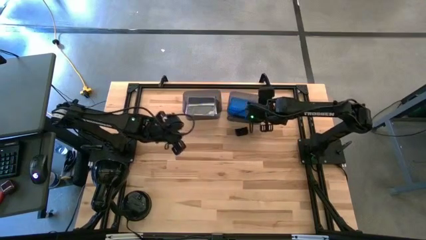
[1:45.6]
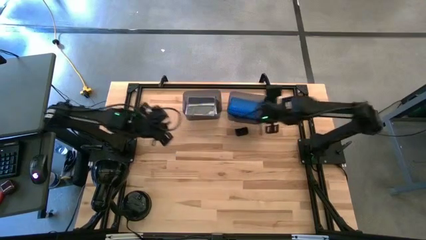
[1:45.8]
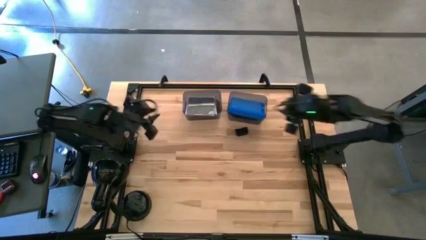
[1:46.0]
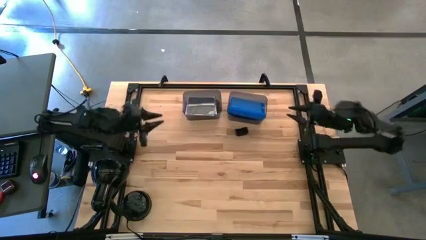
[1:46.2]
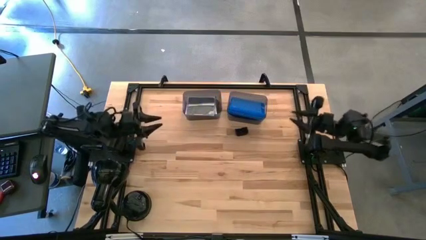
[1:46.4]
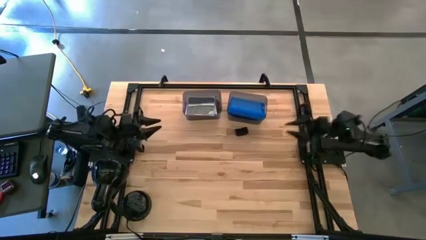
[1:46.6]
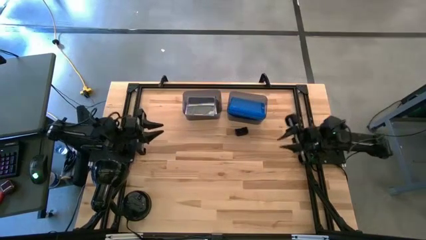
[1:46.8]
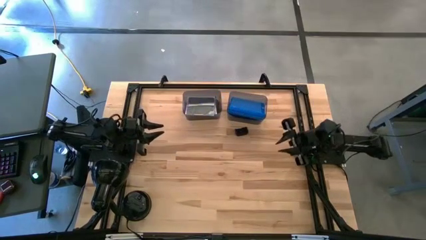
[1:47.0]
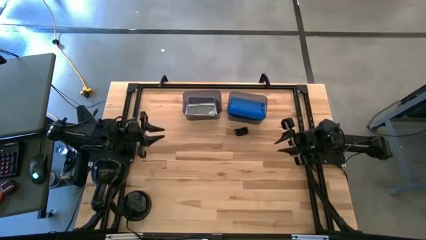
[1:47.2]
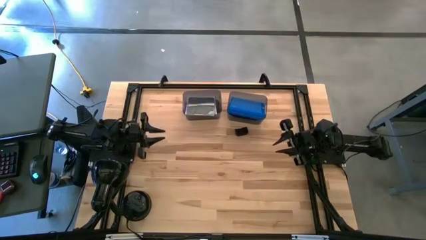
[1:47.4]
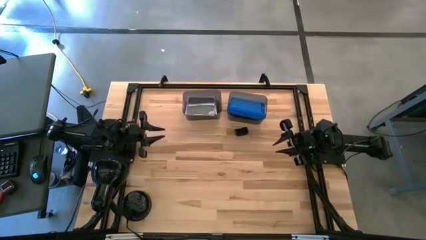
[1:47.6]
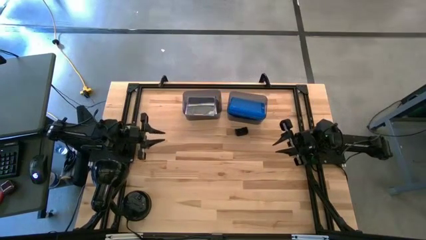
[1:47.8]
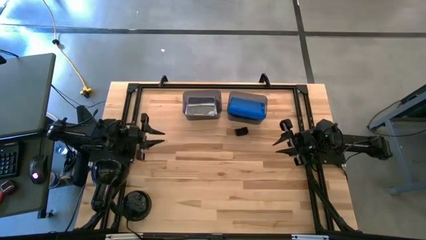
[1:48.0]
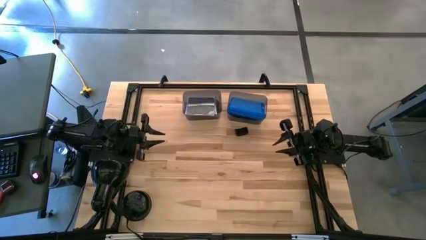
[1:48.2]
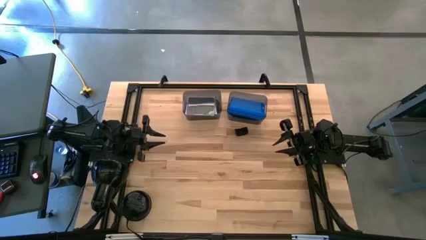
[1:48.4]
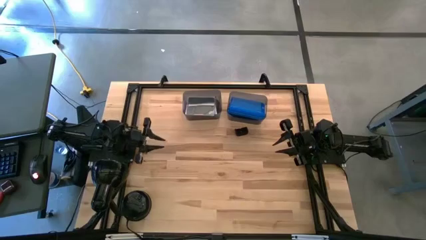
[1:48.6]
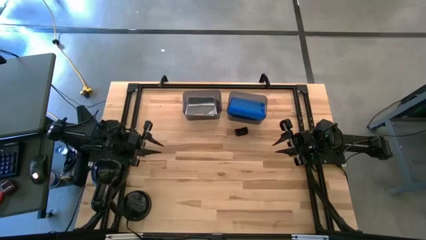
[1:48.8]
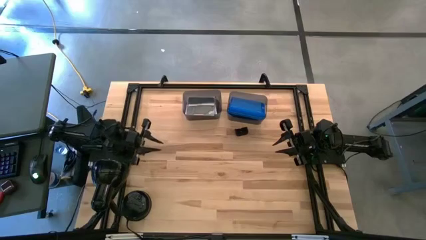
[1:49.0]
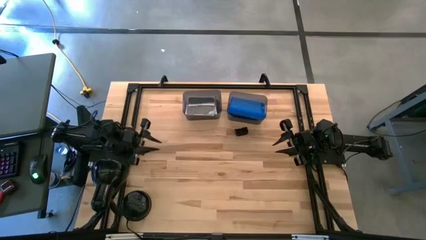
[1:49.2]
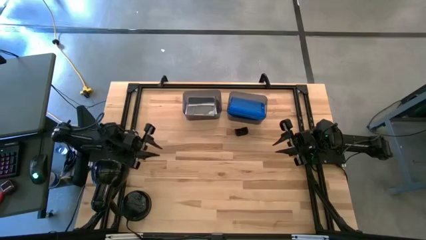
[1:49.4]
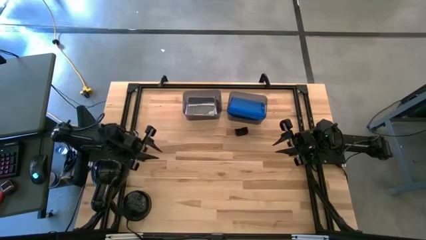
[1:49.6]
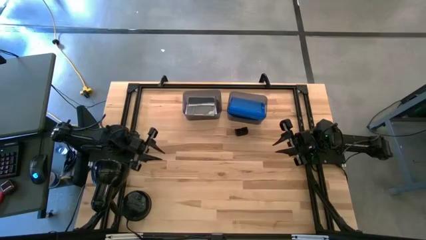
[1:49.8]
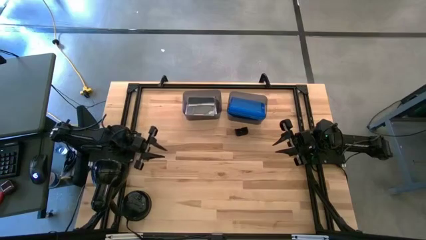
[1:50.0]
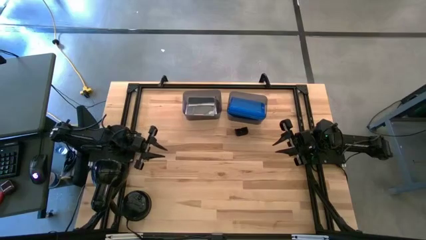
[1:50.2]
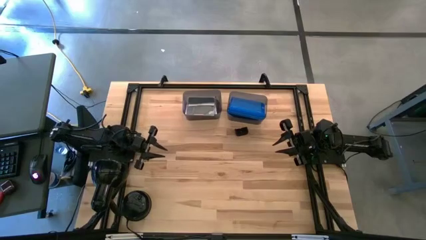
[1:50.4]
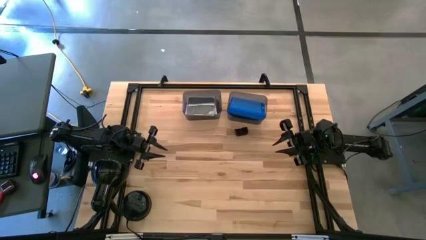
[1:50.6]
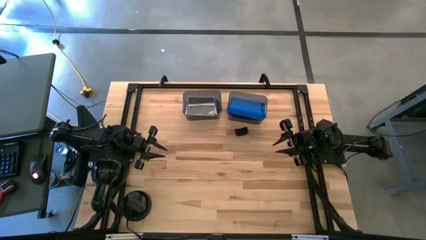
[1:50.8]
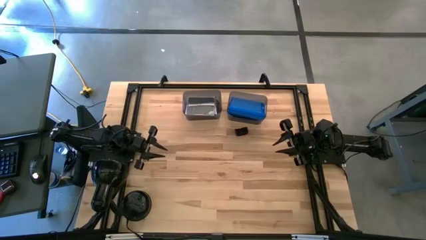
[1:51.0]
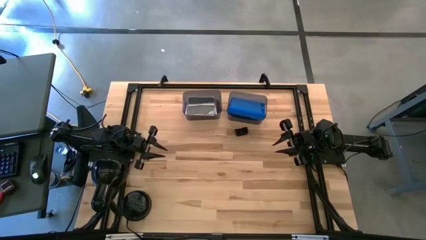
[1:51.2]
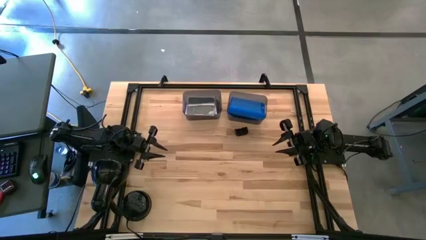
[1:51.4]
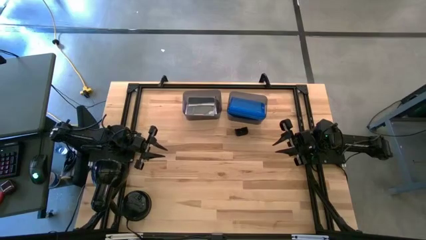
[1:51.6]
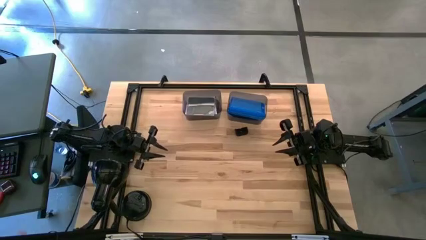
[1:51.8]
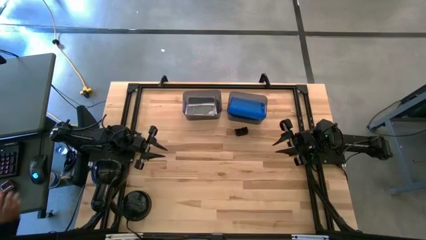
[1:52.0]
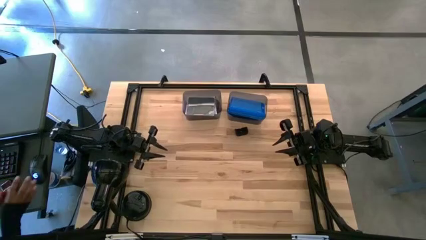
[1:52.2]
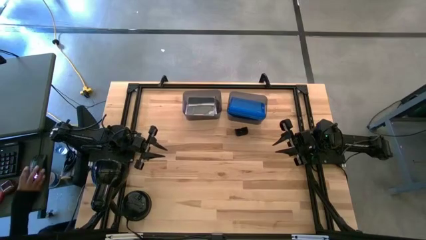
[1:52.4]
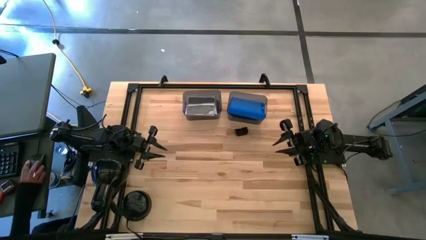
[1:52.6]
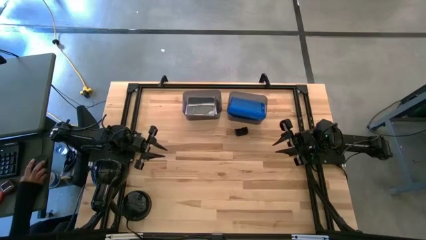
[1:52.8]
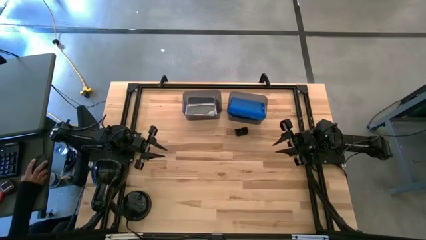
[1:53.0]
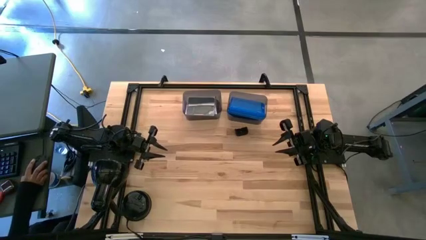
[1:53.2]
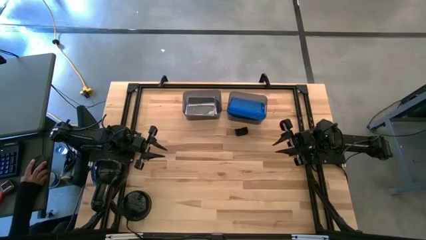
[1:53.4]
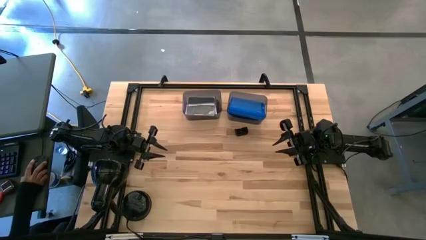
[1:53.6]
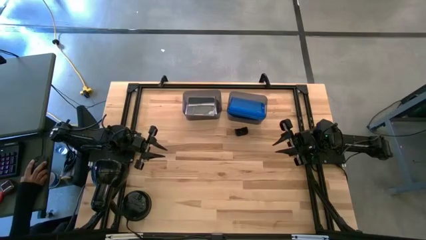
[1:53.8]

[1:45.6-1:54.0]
Task: Pick & place jewel cases by type
Return to Home Position

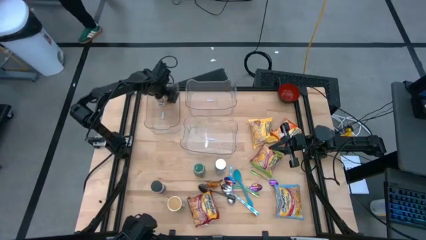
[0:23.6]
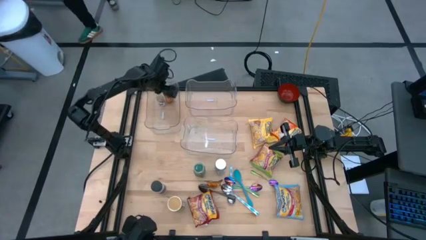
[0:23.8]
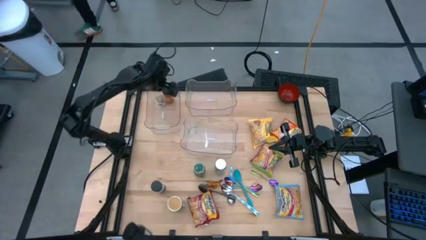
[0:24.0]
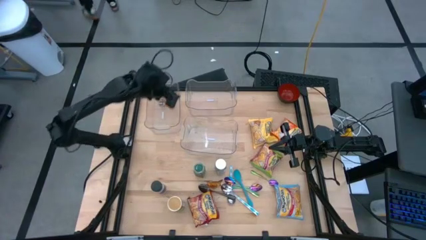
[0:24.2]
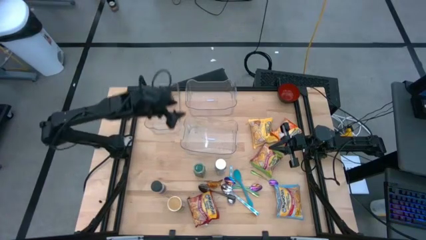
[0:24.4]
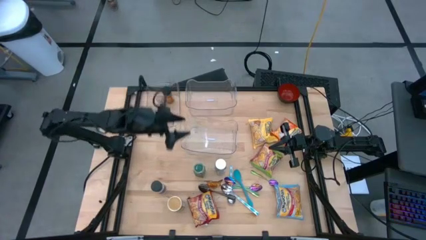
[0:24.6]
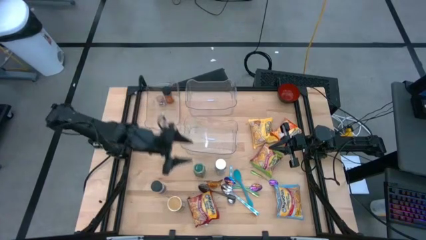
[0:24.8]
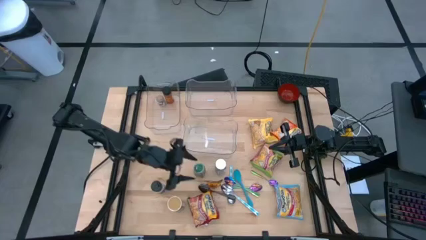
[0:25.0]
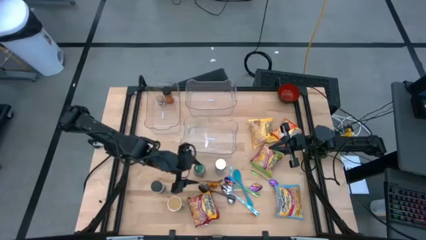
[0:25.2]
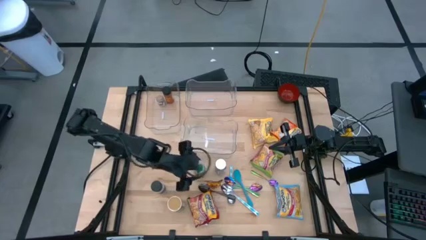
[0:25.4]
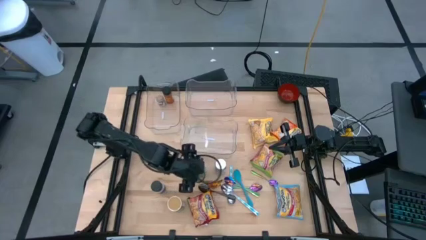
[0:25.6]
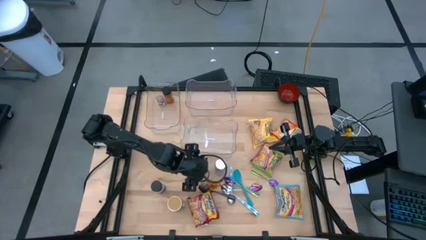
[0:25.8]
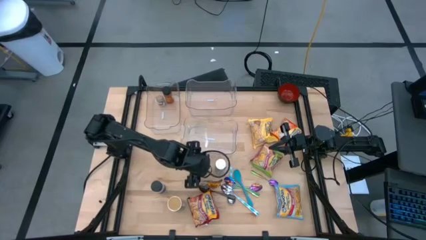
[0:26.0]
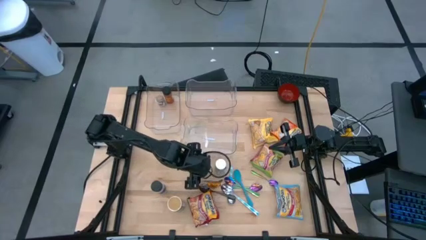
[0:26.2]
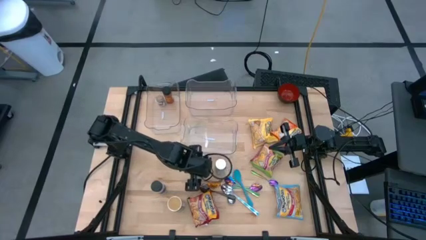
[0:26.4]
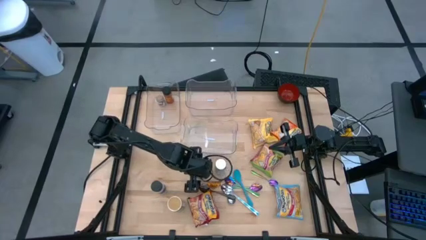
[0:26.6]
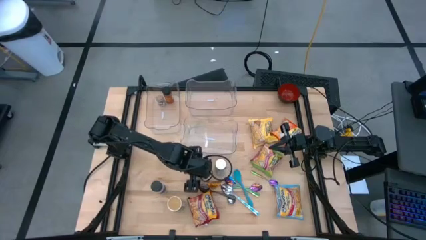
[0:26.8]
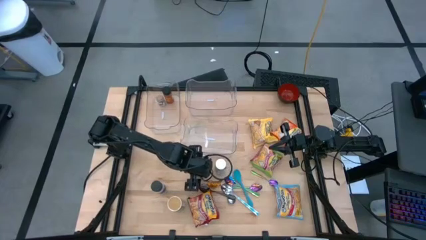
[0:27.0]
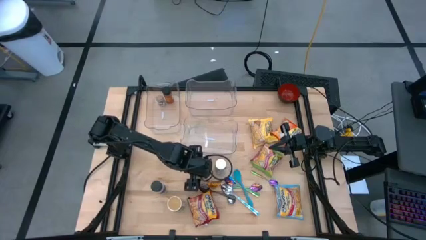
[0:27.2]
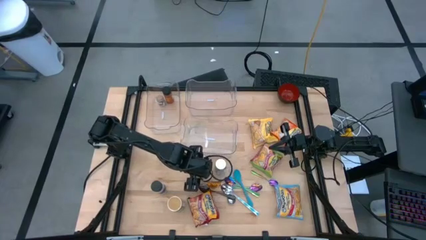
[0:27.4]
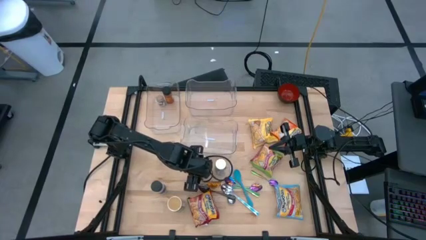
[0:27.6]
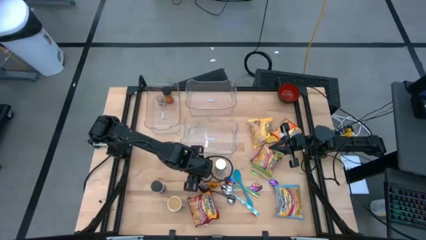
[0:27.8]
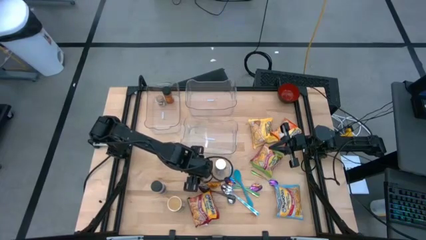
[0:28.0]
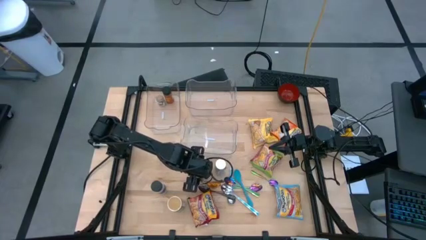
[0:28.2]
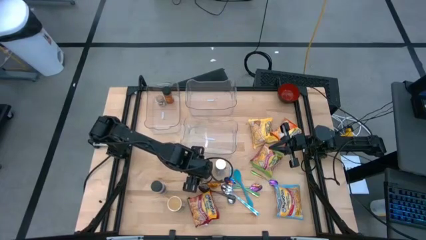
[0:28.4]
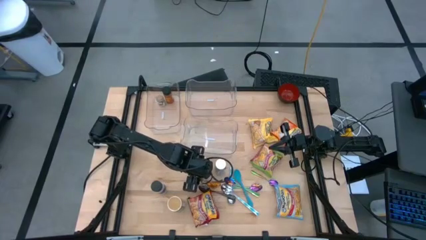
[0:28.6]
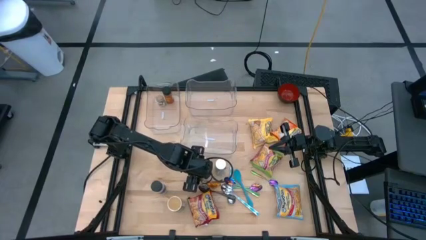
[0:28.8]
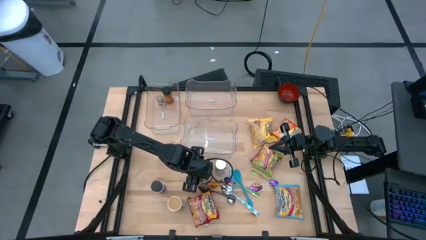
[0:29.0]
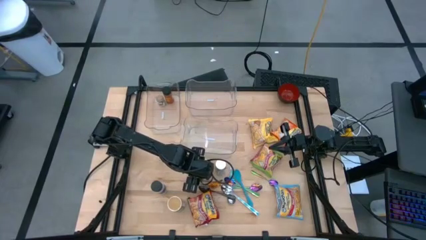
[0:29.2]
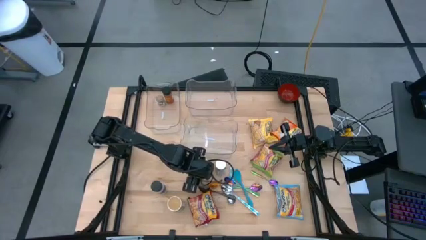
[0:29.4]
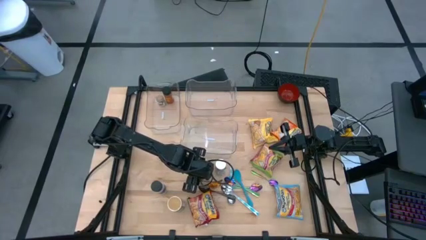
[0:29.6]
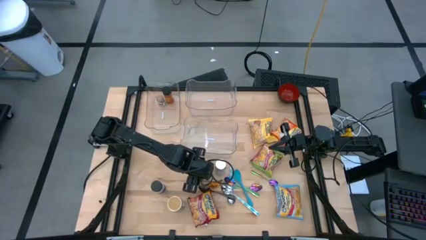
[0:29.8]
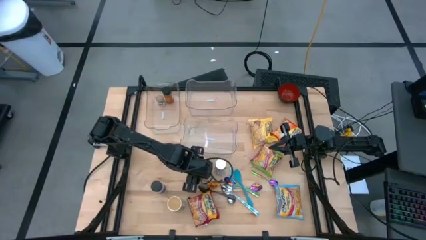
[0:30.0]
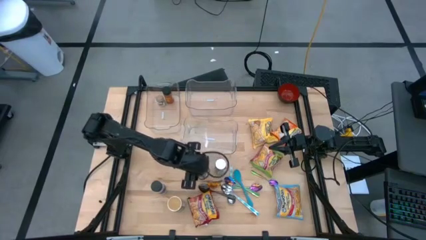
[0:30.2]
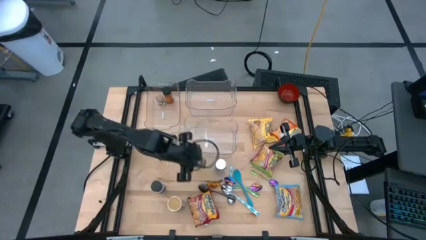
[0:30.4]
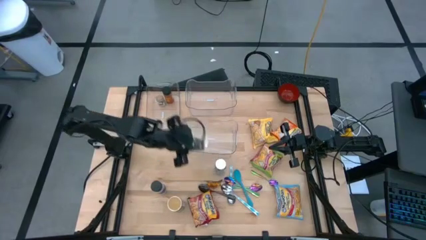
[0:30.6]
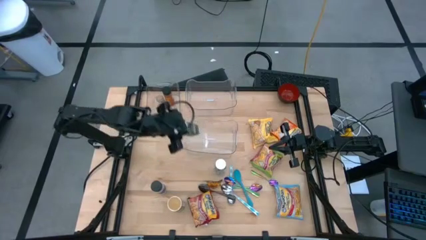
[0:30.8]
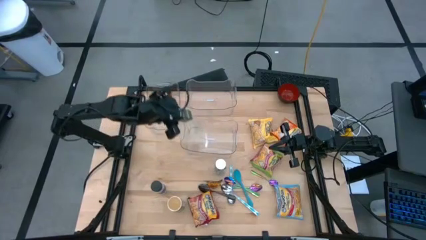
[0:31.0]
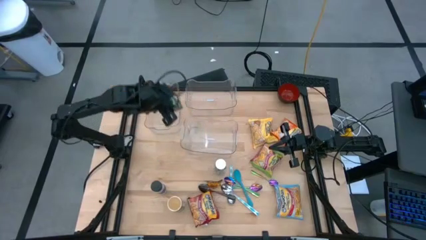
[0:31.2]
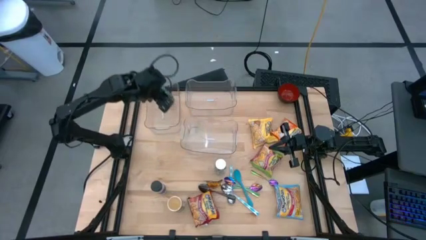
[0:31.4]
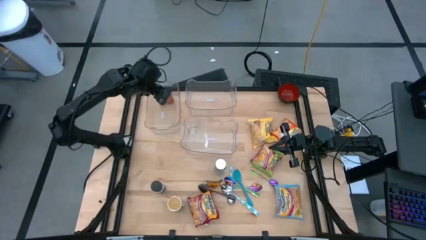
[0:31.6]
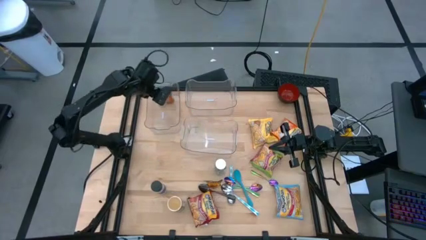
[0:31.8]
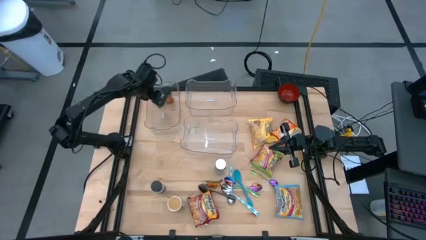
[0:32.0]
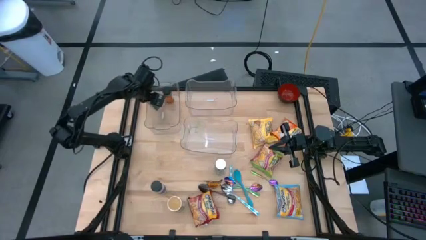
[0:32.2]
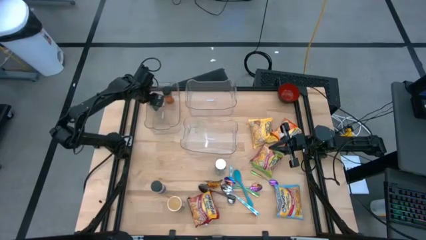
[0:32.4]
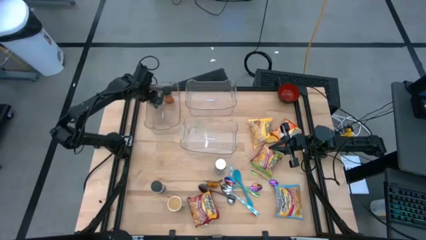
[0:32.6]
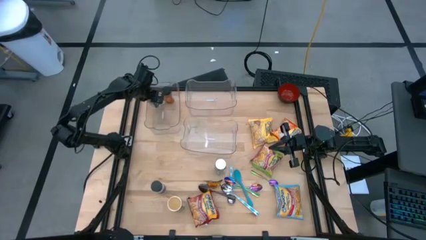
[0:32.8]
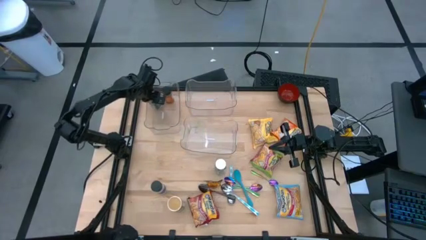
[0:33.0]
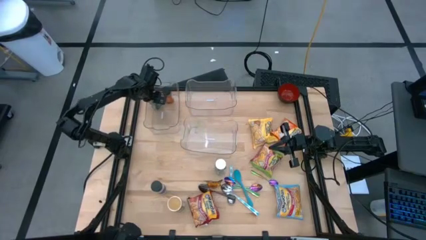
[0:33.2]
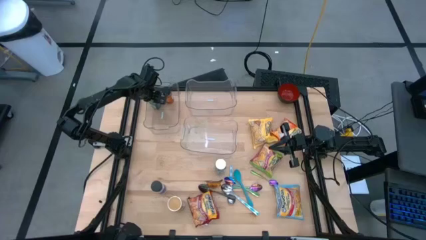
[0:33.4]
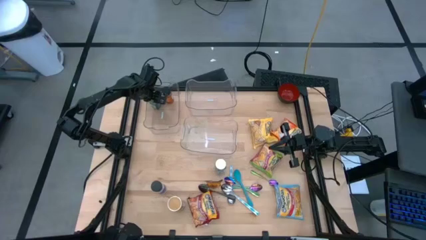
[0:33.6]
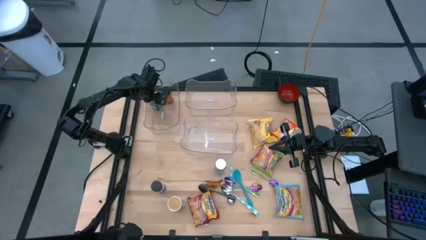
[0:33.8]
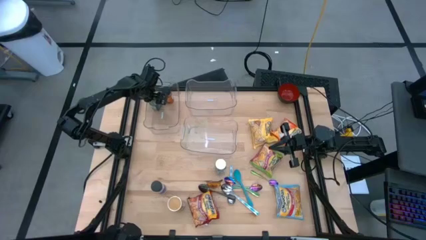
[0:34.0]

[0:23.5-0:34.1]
Task: Pick & Place Food Item
Put the green seasoning bottle into the top left transparent bin
